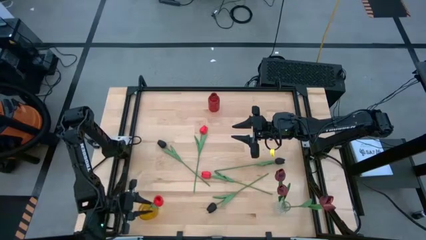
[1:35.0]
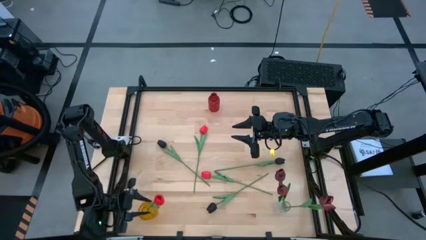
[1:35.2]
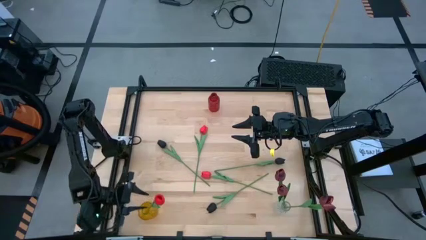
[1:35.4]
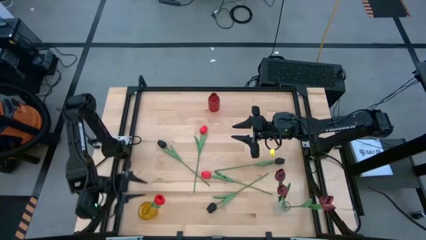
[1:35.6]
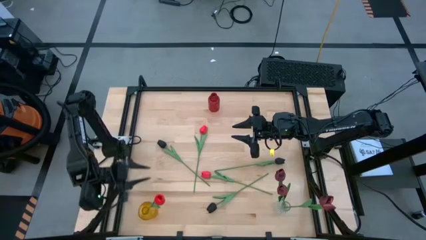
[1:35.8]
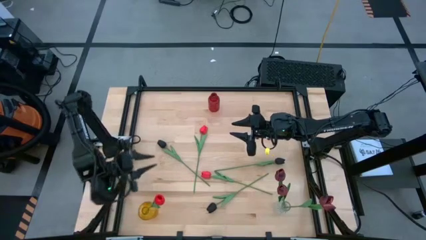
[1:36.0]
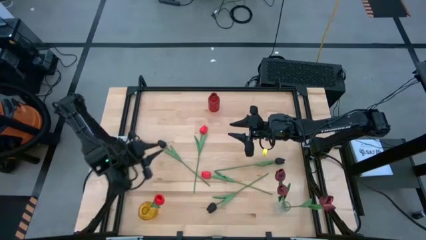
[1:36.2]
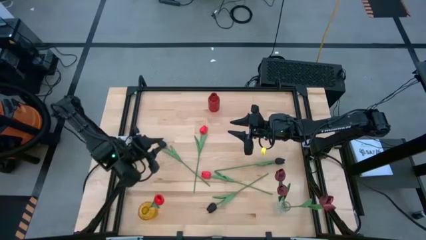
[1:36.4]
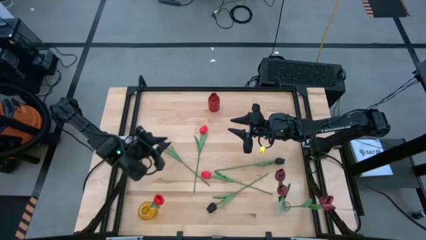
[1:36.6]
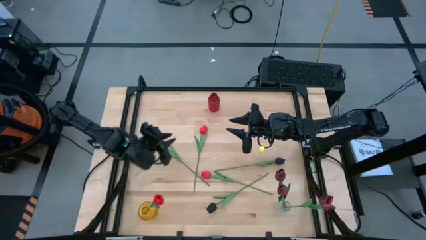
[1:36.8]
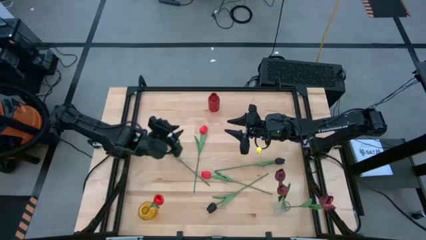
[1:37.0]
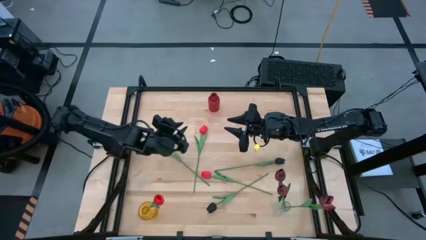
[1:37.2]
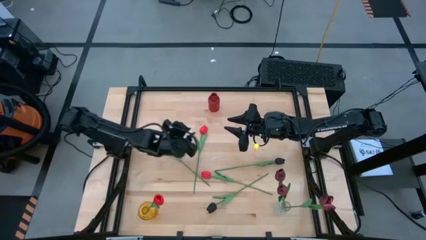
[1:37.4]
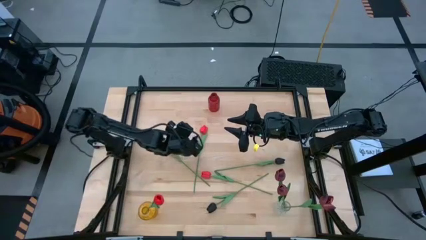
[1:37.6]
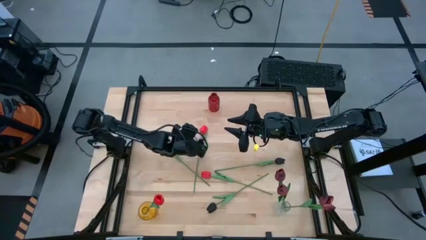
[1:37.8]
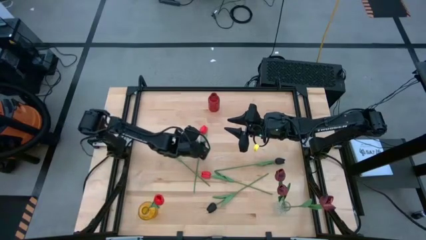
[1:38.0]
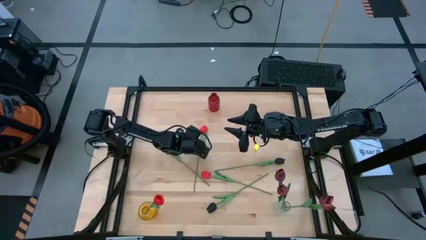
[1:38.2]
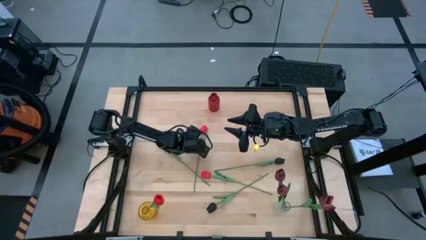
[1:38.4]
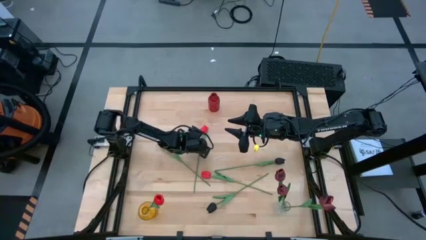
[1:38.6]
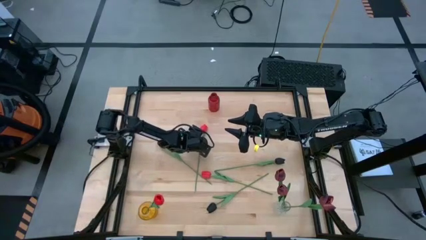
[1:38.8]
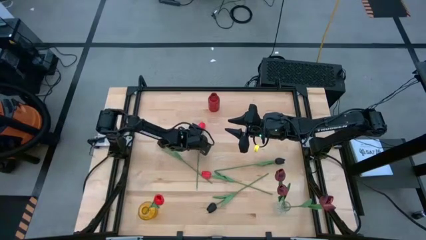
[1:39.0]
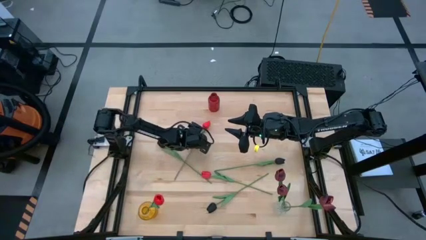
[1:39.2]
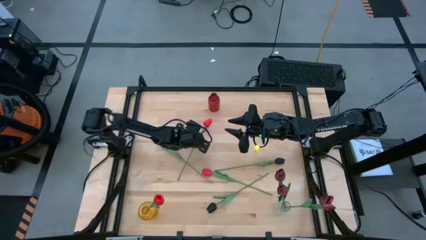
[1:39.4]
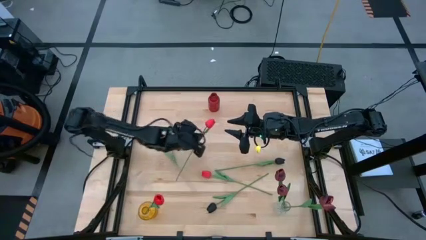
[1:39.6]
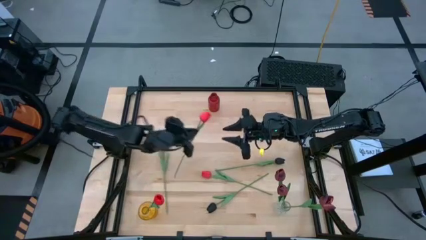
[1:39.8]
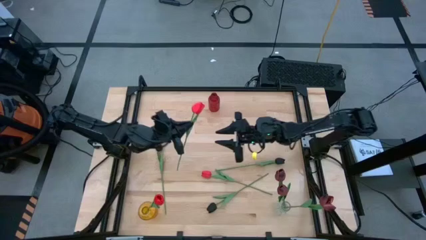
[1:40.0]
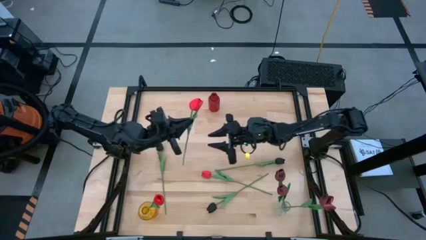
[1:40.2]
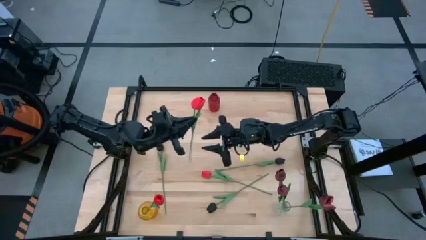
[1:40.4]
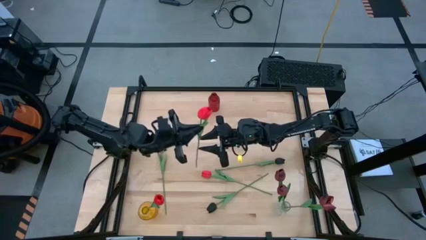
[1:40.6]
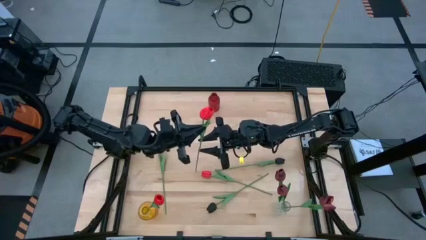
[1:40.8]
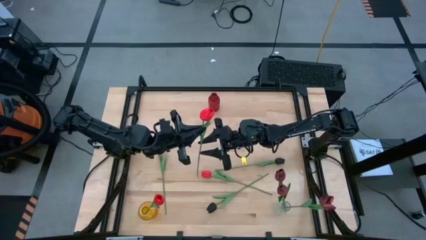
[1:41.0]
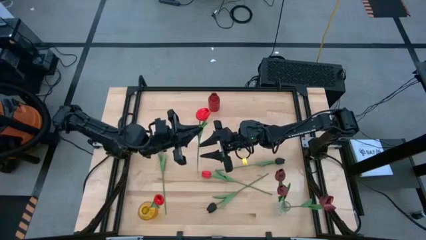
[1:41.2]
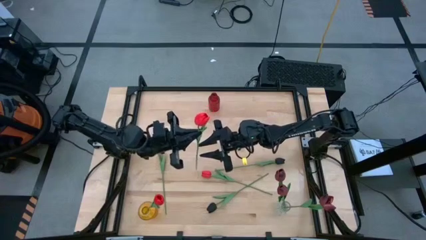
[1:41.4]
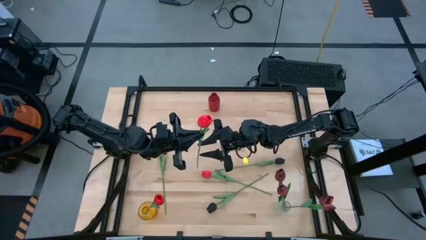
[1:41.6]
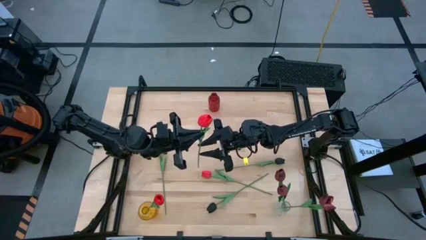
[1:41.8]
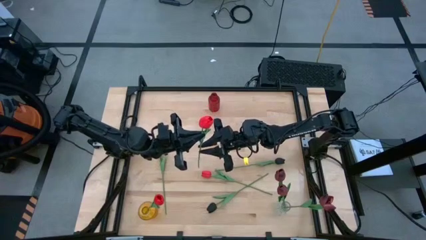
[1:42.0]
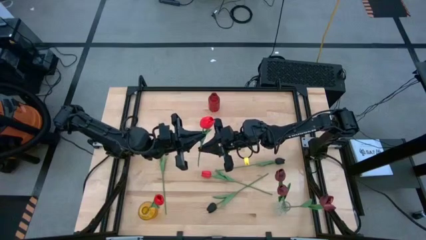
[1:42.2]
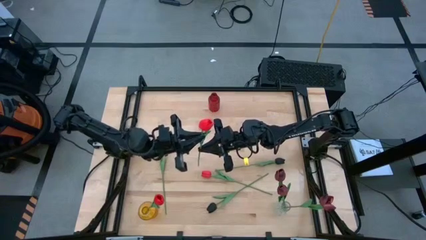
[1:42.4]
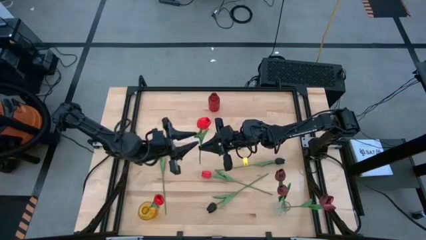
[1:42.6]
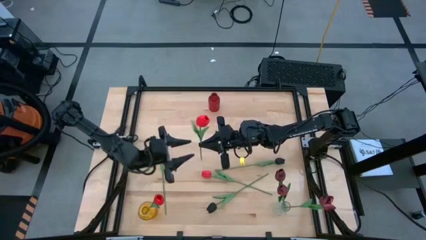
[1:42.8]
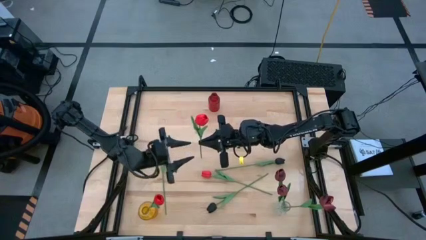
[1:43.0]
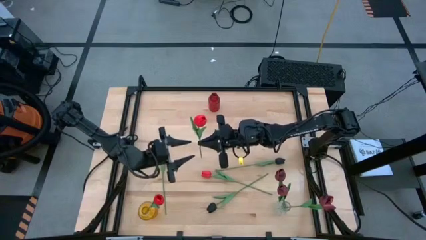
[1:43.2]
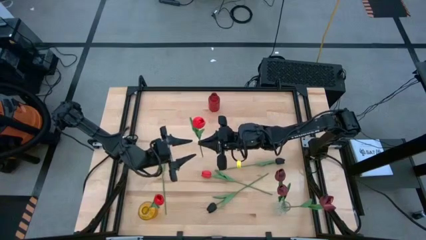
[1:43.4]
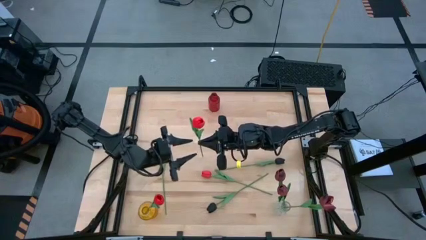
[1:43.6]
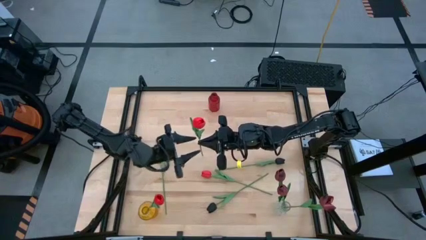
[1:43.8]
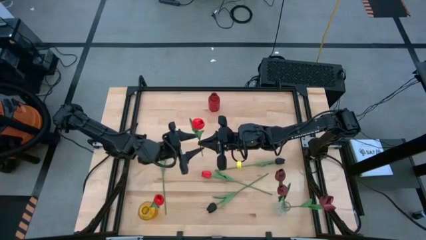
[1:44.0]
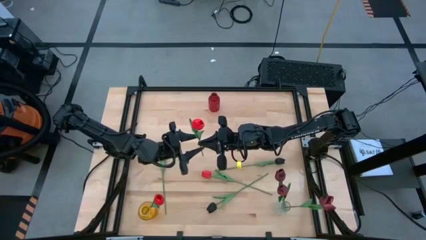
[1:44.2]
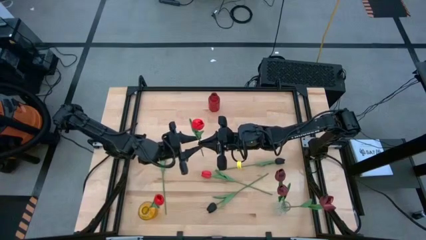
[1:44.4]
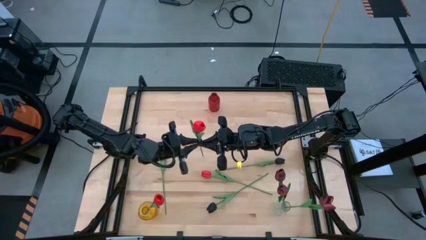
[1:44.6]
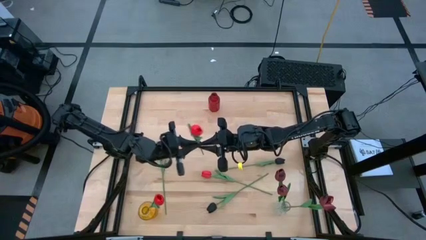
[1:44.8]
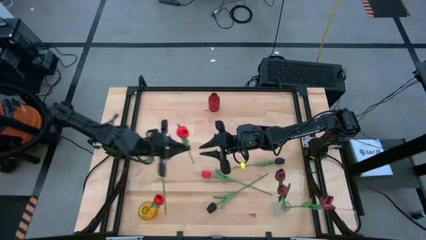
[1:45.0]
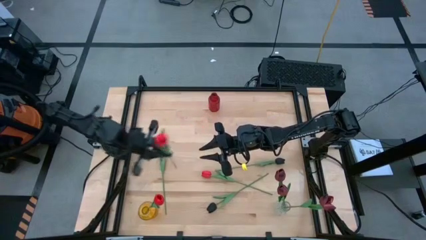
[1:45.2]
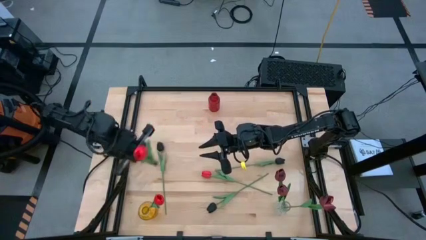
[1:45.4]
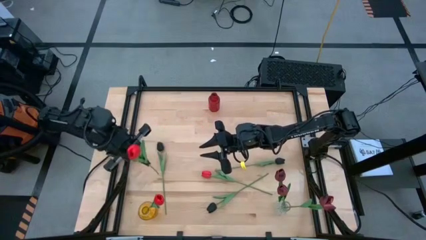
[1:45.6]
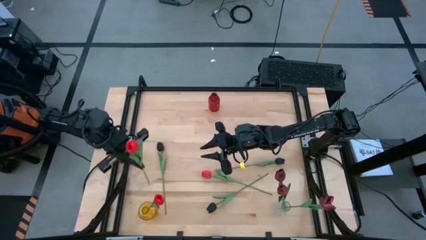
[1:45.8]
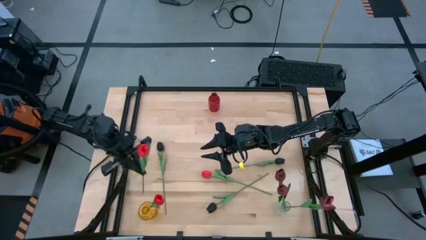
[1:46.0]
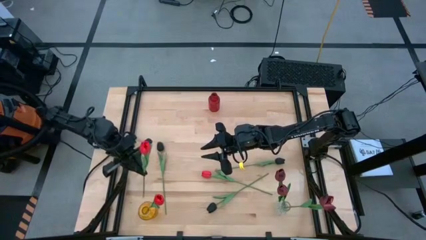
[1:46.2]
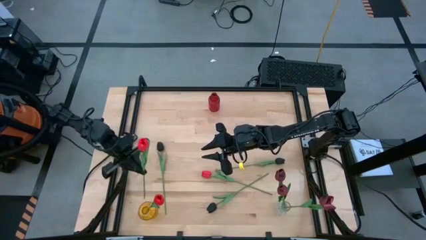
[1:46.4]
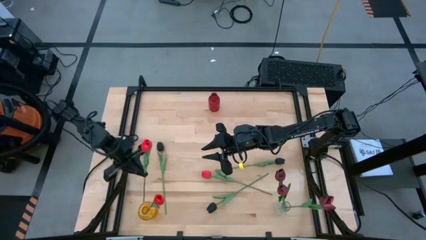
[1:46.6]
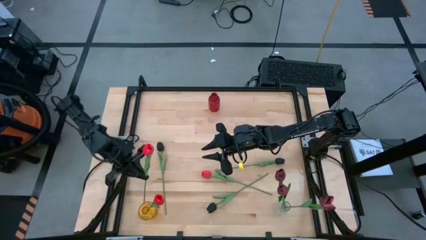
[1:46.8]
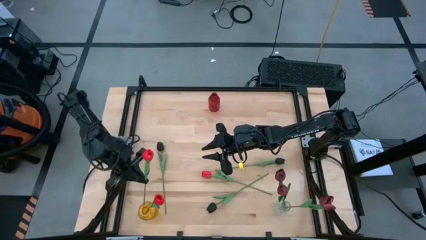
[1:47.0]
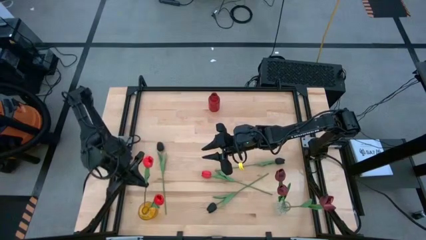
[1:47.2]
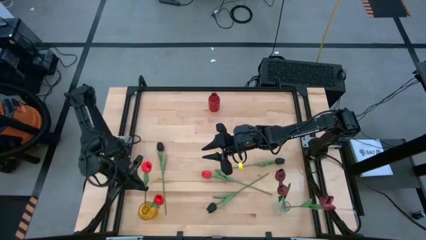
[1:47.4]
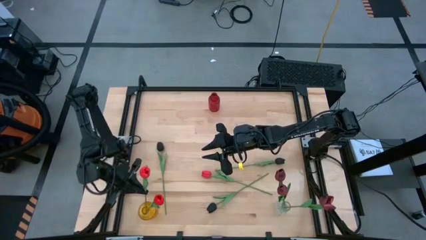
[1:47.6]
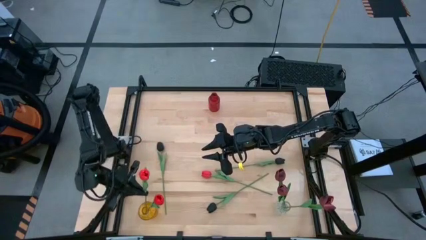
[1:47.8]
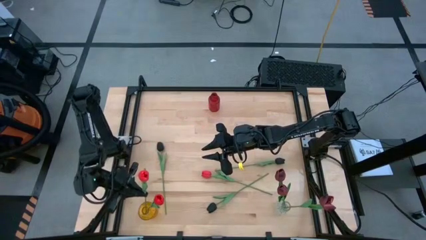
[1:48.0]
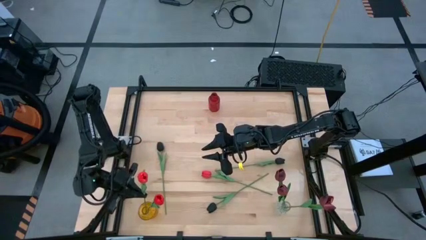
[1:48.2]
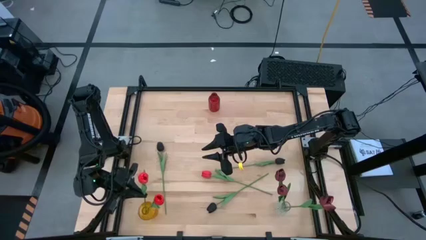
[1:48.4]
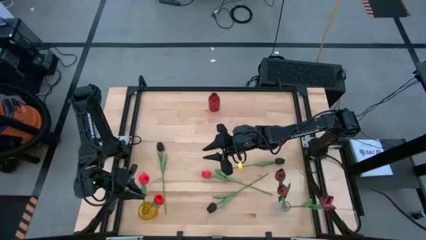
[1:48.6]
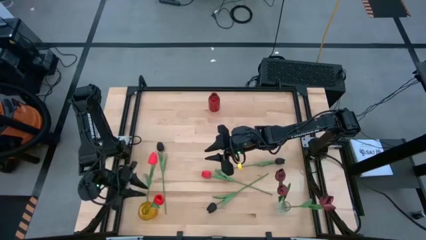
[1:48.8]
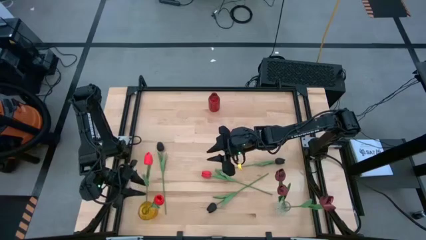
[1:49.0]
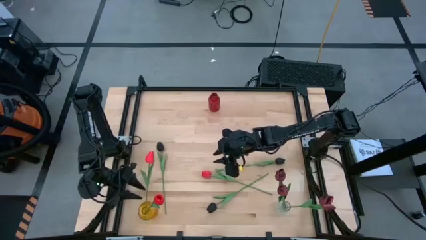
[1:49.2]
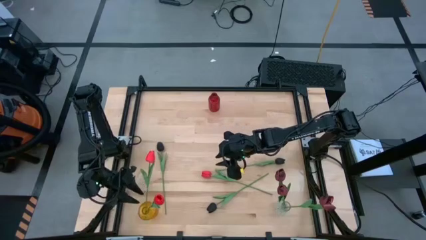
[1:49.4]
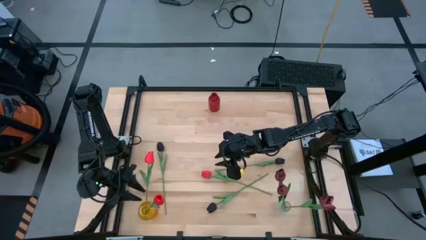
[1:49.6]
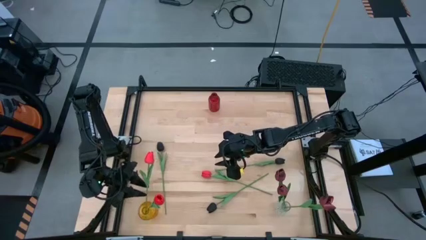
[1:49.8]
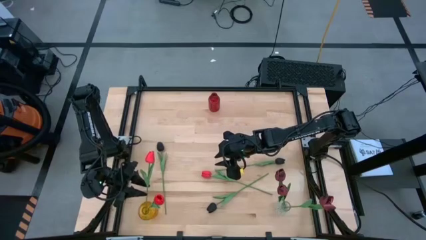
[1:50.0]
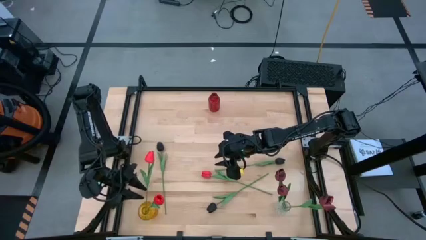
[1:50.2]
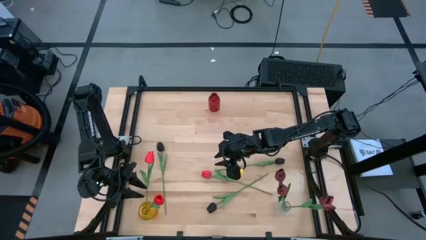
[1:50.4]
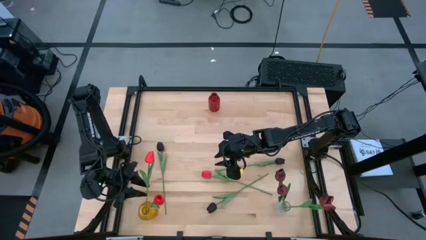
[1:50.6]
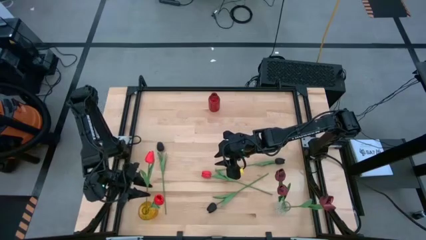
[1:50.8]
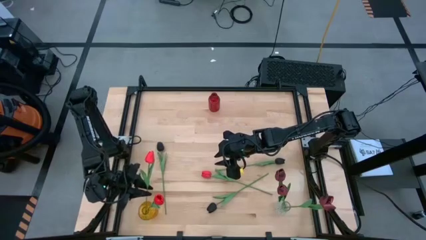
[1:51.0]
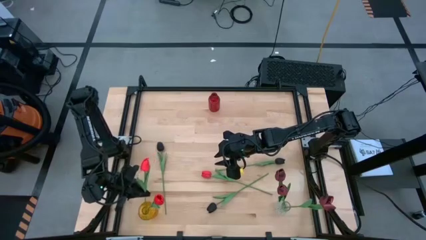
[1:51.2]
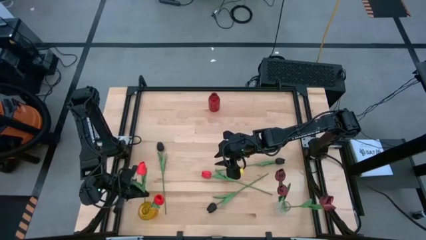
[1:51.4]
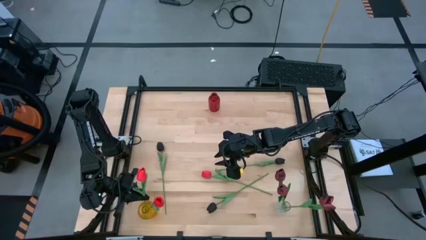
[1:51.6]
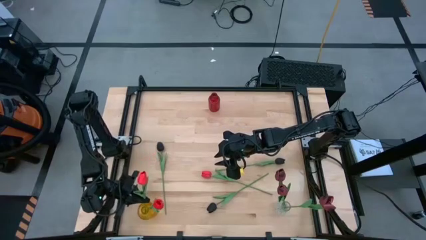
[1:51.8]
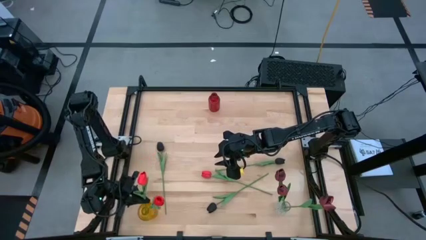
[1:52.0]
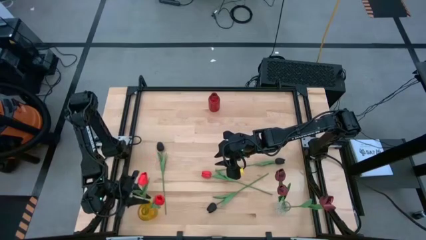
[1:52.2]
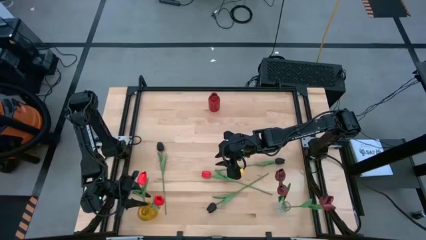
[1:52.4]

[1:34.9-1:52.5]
Task: Sort flowers into vase by color
Put the top red flower into the yellow vase
